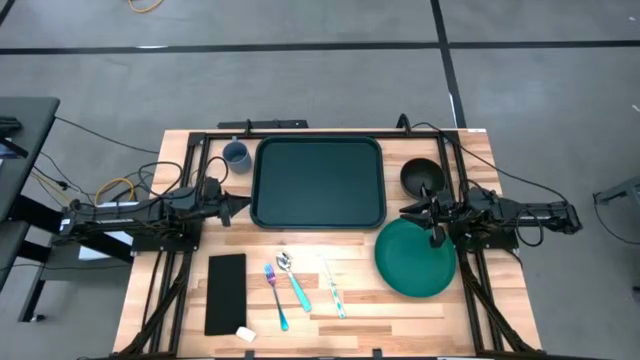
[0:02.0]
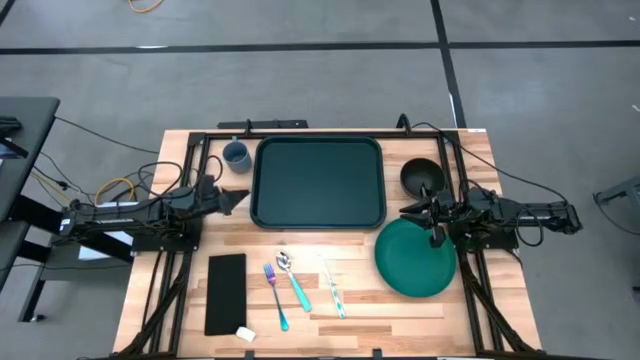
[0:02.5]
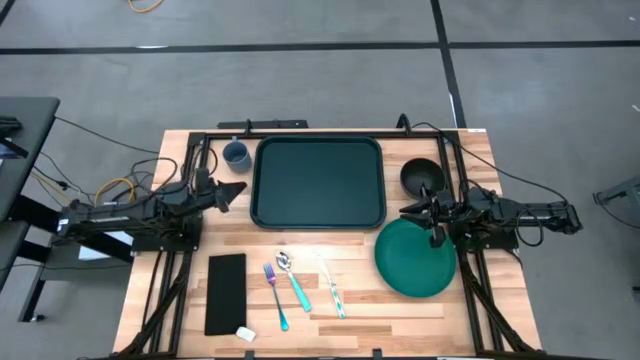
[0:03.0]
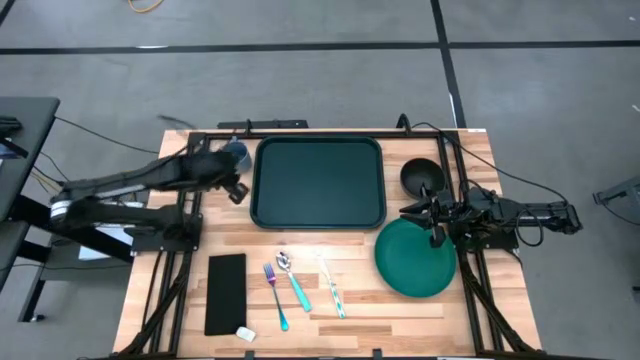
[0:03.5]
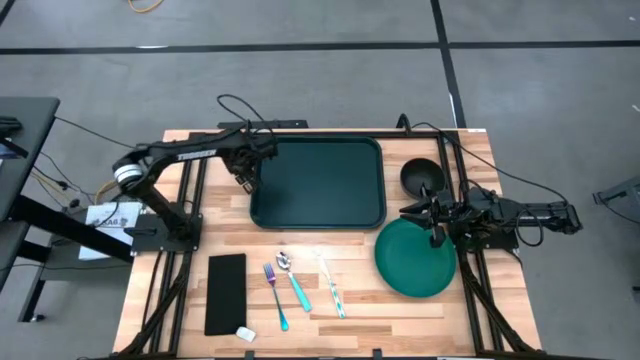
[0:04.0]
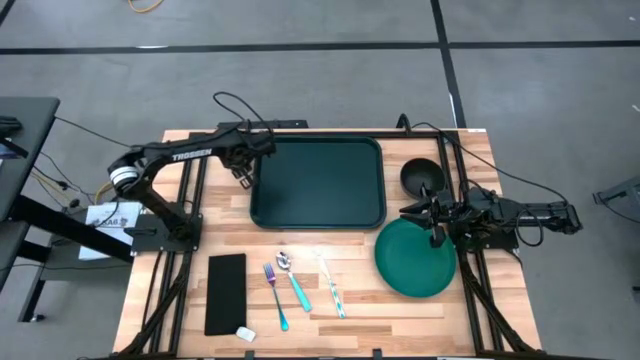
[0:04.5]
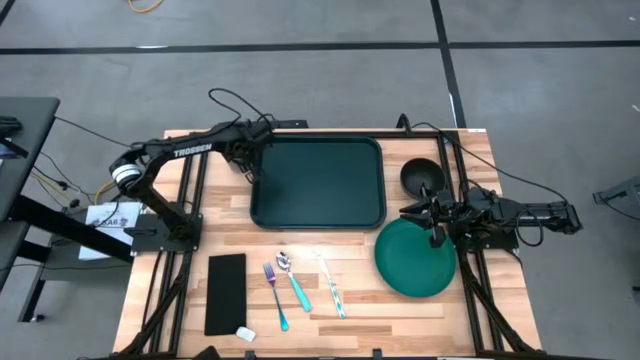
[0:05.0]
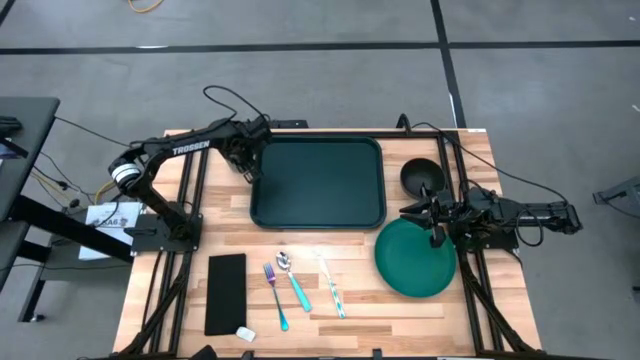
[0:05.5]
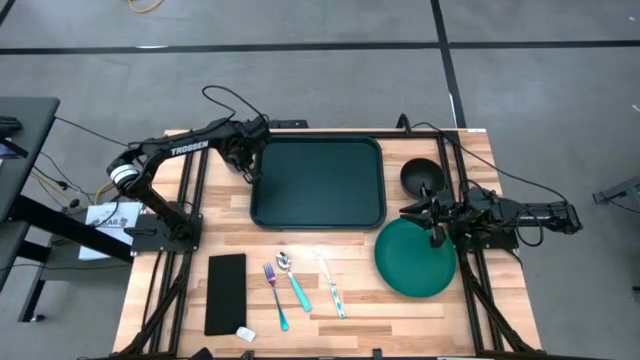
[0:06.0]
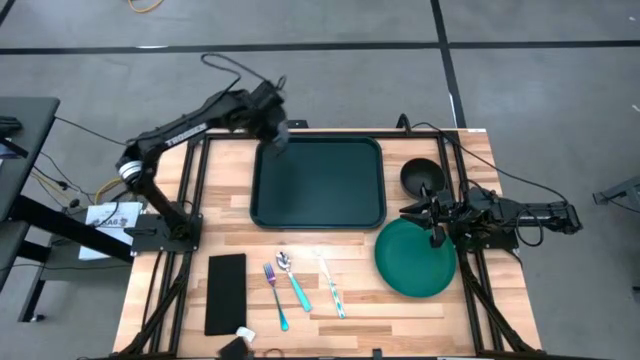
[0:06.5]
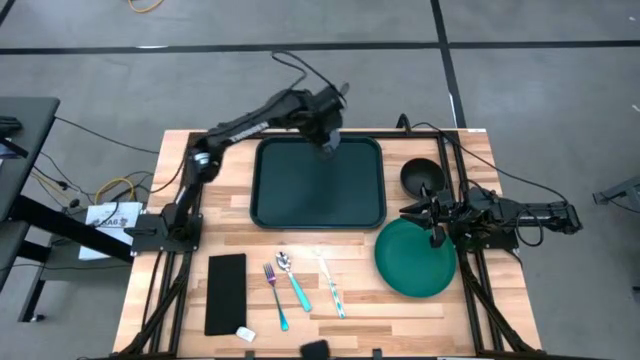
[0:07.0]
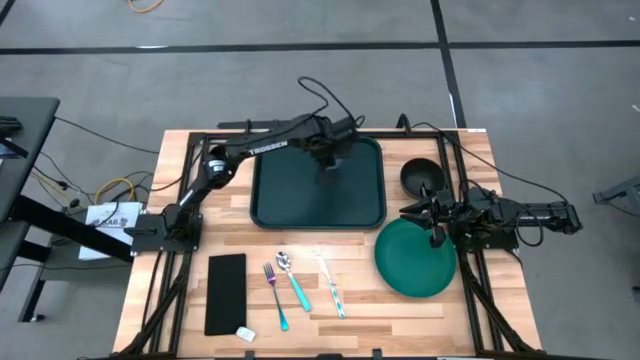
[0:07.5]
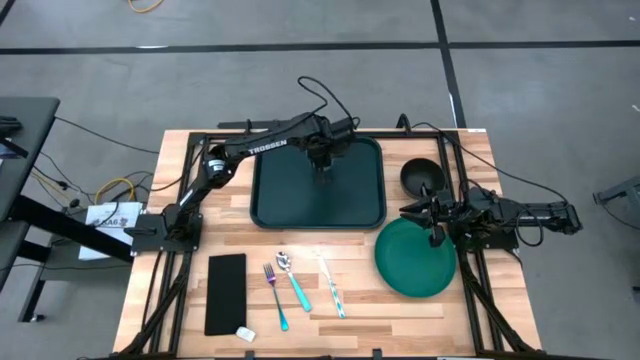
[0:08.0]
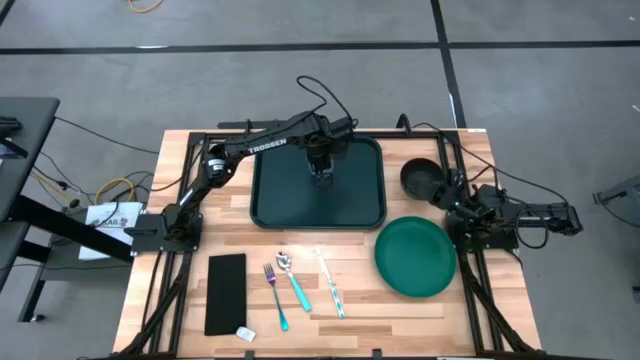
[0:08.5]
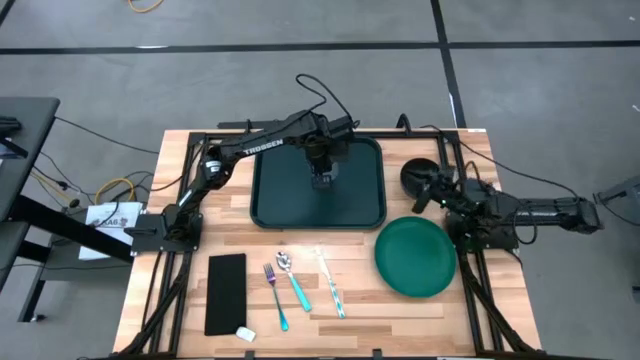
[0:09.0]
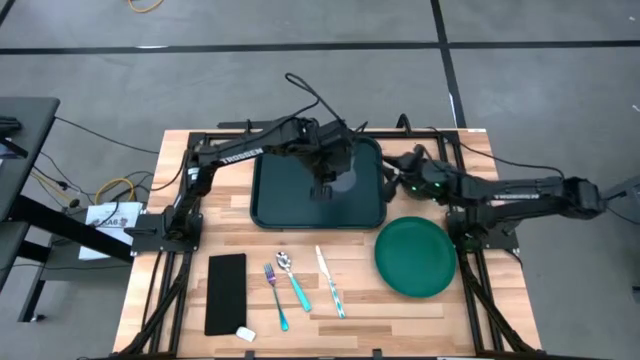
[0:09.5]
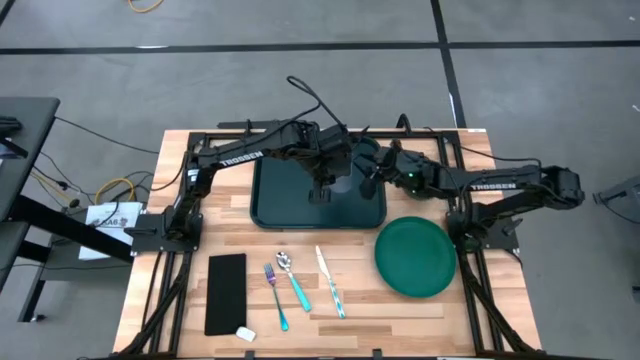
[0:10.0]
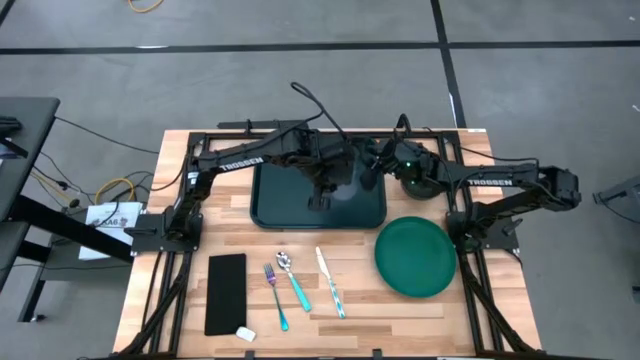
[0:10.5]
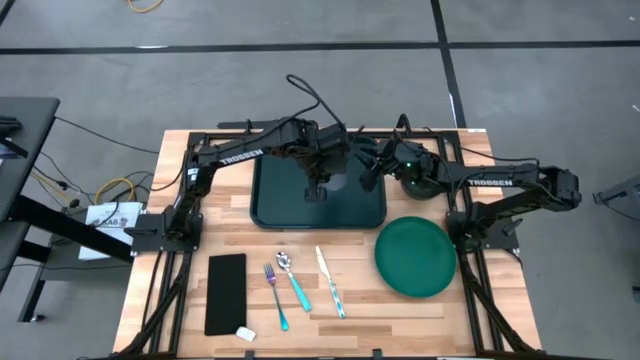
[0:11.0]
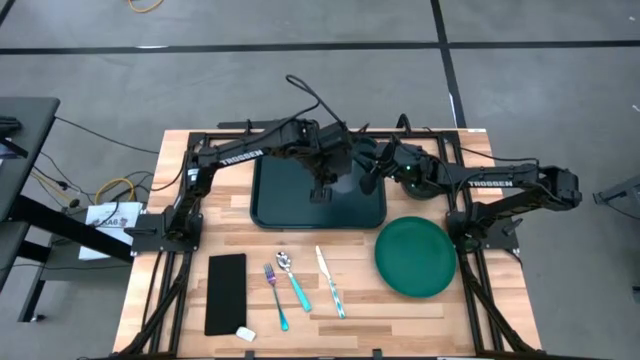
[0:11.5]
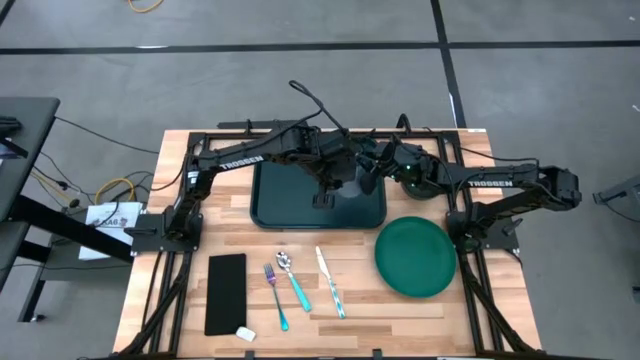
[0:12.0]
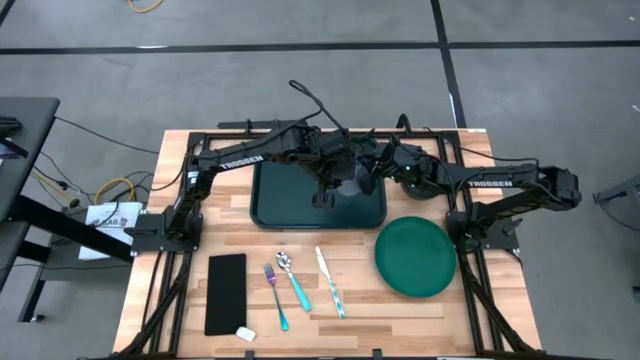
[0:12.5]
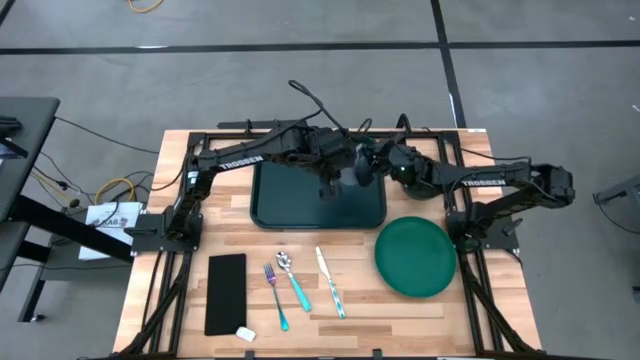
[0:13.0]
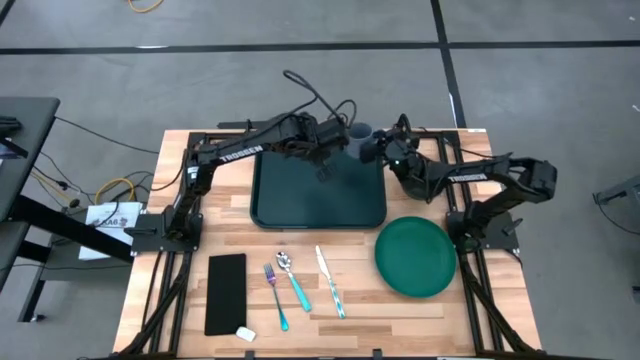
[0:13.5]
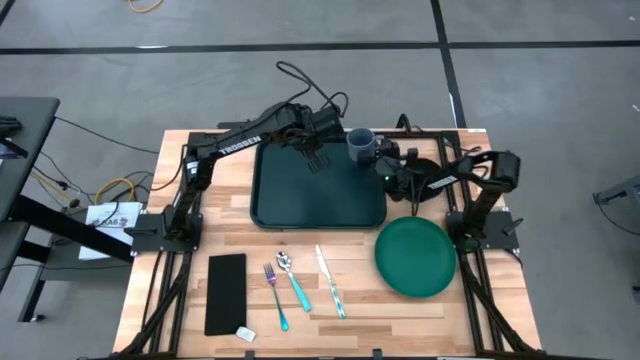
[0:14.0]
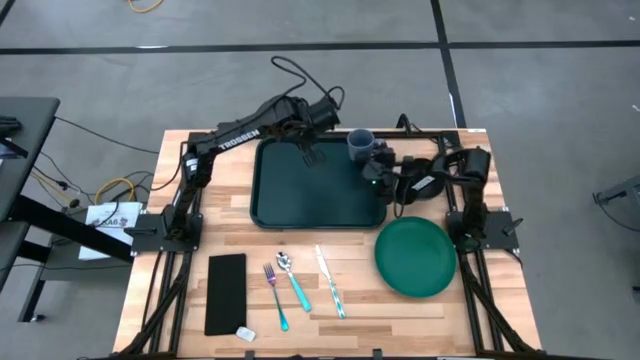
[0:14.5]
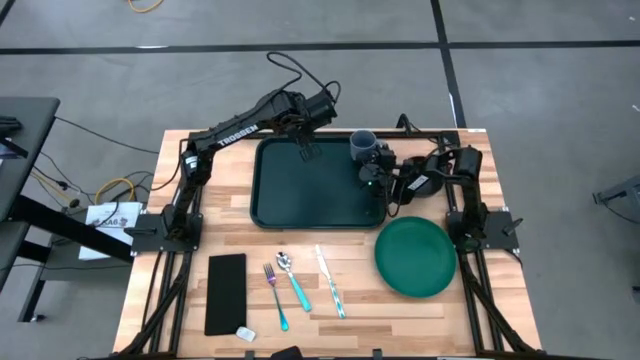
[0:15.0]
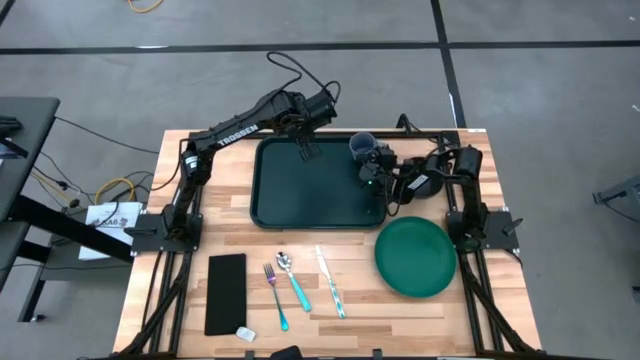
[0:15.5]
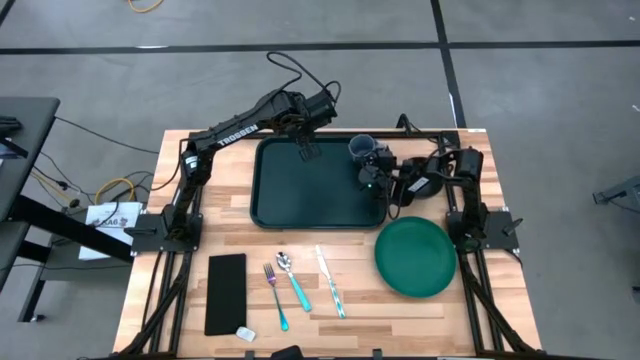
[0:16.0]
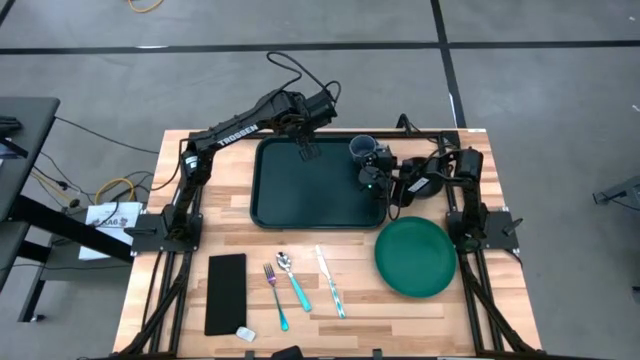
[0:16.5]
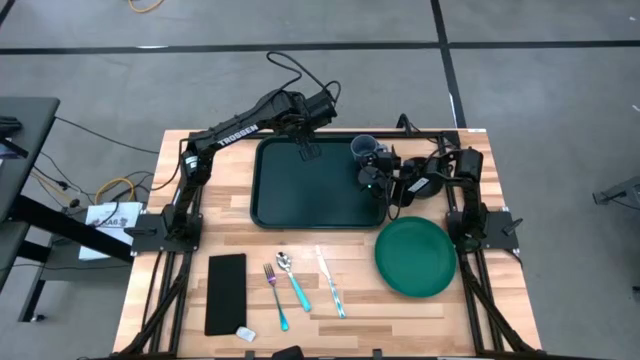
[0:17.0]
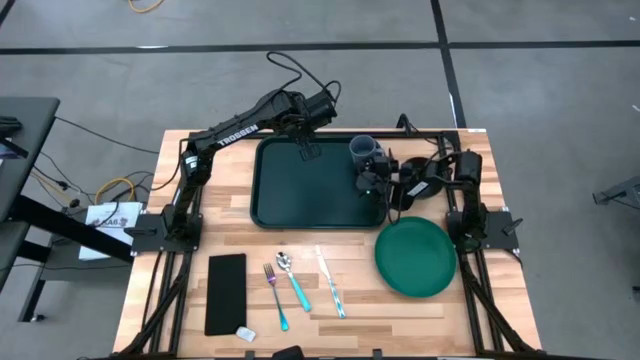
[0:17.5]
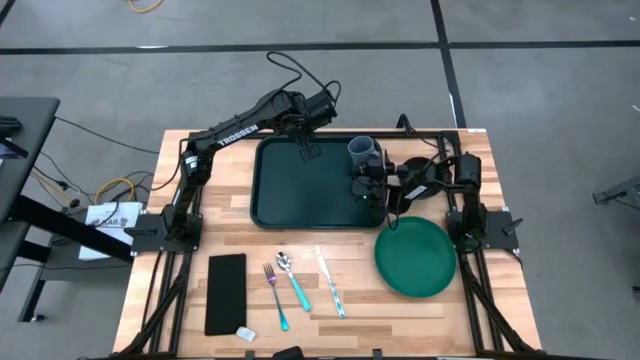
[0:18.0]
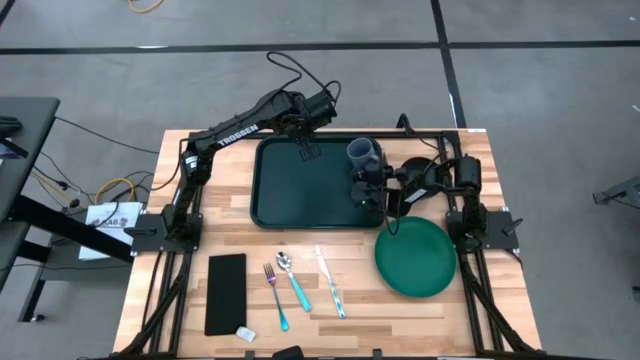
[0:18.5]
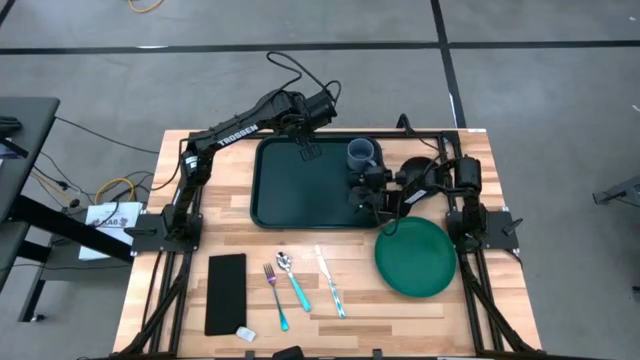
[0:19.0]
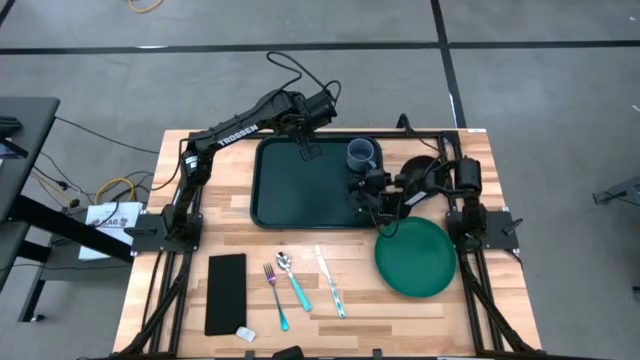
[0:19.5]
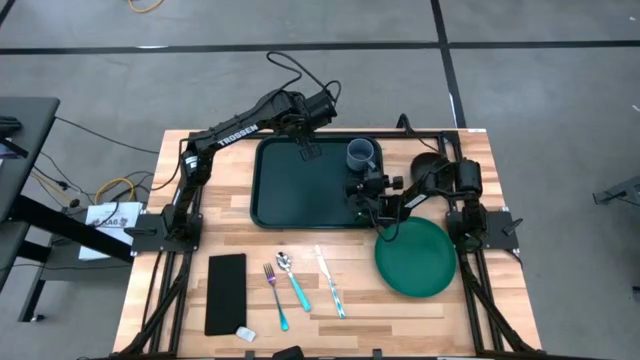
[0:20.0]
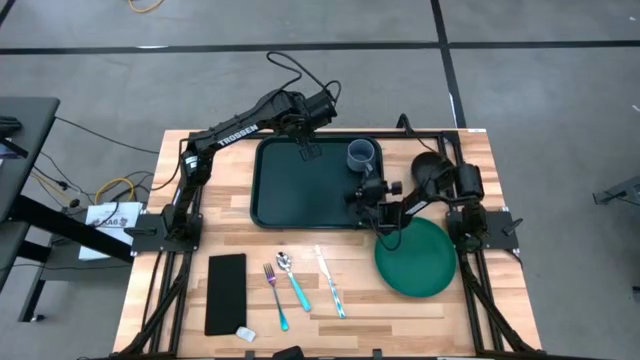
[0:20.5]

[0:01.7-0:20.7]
Task: Set up tray
Put the gray mug into the black tray
